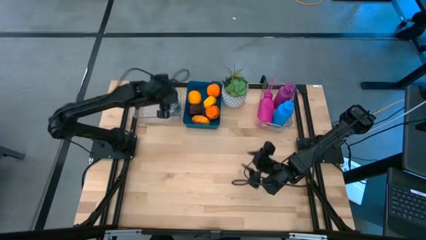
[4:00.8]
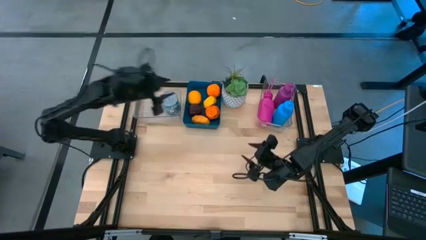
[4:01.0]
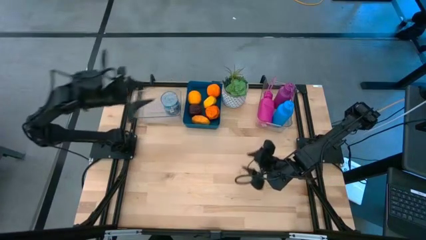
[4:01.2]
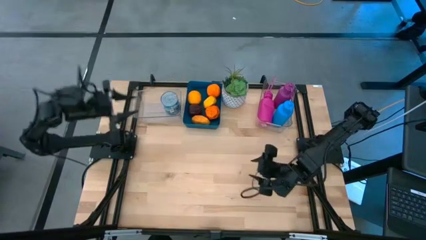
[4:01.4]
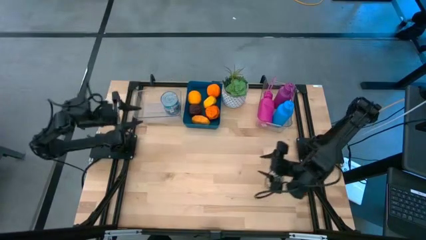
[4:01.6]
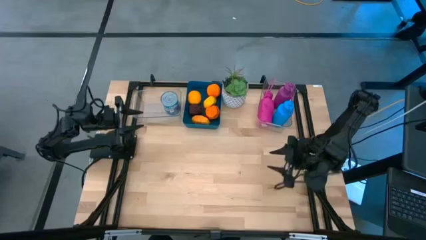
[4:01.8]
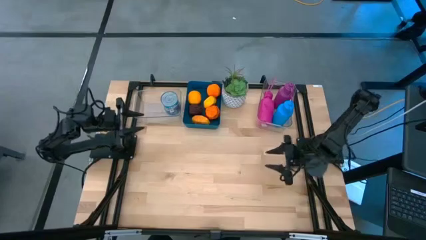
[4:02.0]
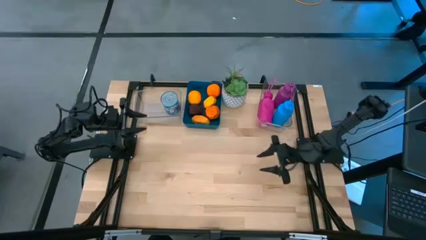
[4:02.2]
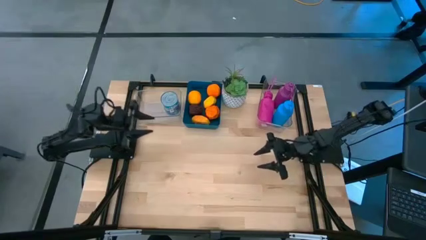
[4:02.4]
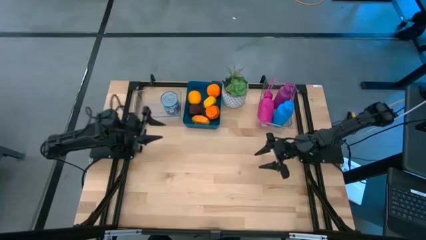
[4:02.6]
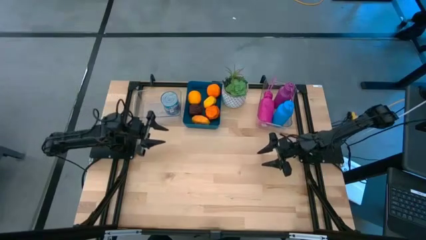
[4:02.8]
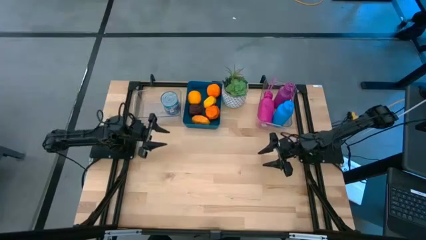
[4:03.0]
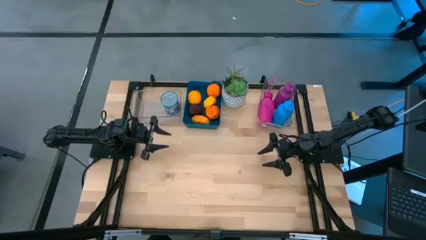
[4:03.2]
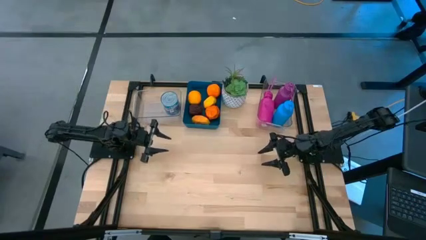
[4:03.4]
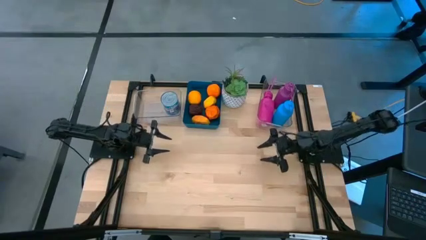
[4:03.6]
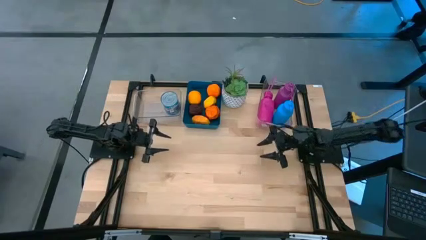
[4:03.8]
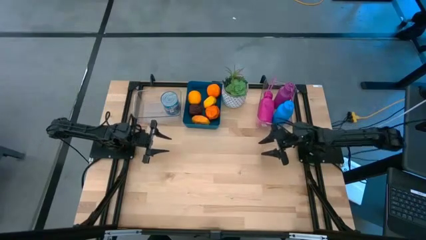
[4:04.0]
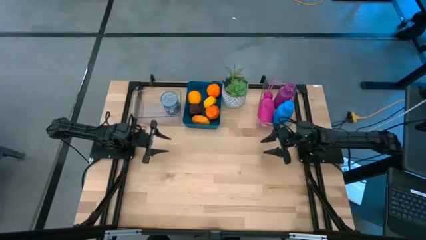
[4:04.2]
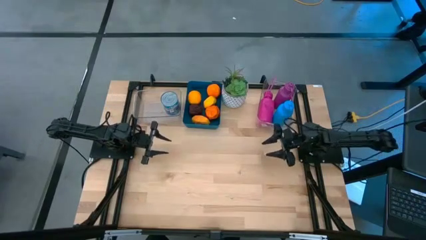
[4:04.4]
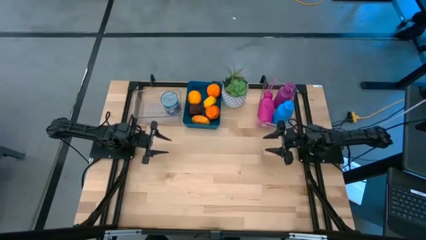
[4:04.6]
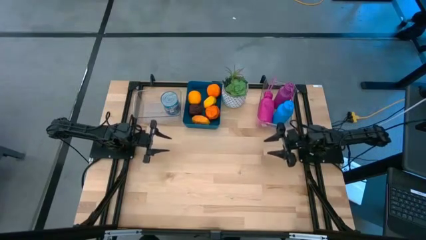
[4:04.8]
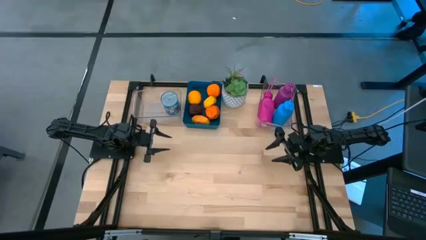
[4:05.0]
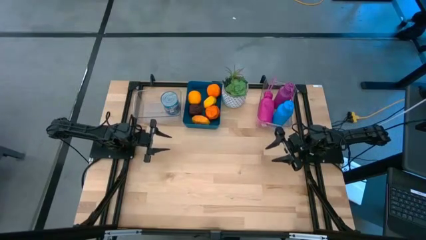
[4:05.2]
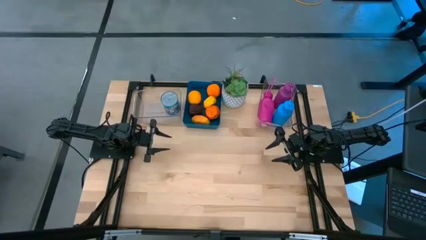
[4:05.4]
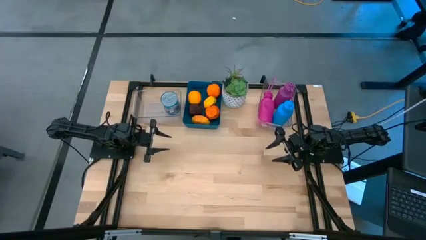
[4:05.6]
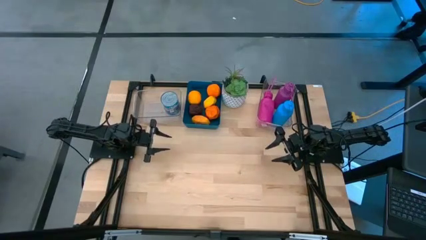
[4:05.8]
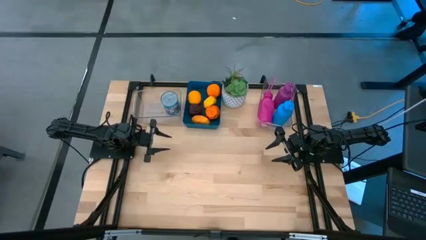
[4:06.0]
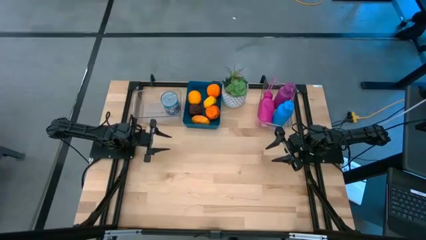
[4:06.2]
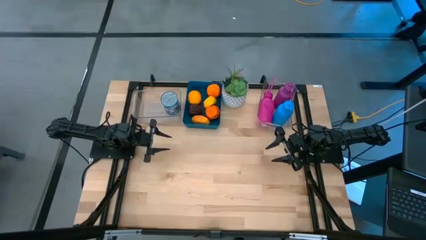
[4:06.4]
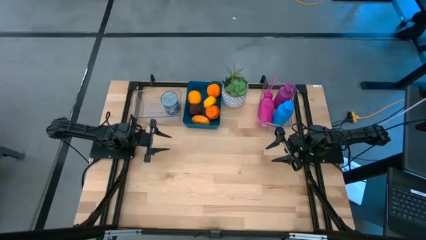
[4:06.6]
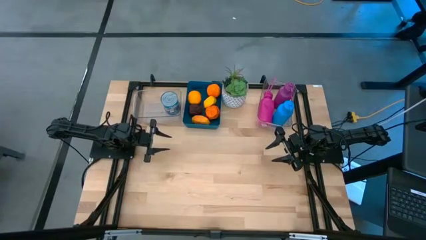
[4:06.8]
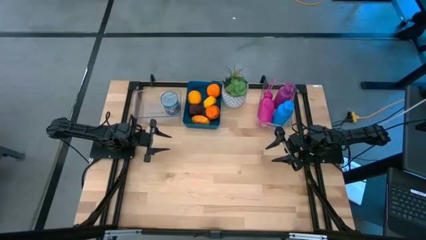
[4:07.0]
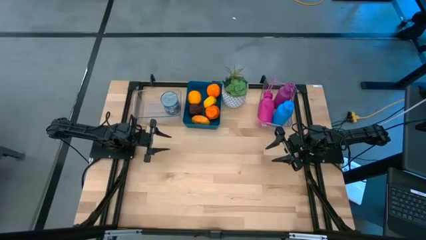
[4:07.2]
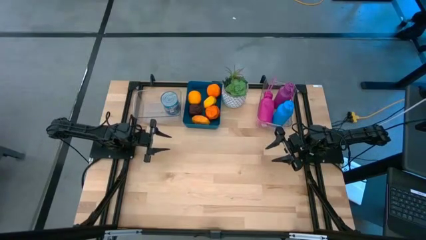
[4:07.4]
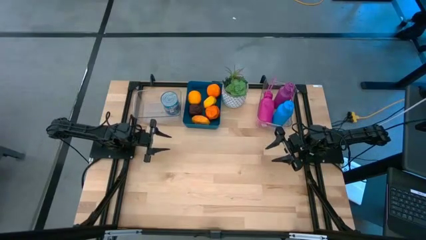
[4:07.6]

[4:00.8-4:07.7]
Task: Pick & Place Food Item
Return to Home Position

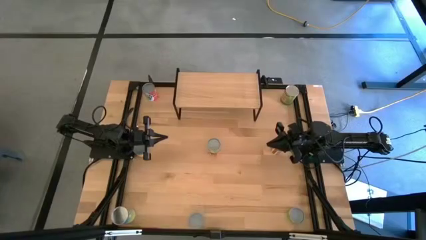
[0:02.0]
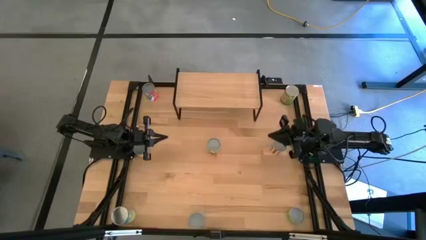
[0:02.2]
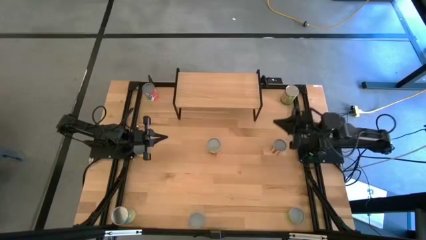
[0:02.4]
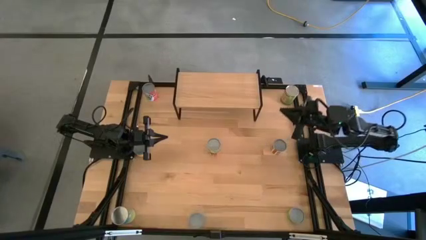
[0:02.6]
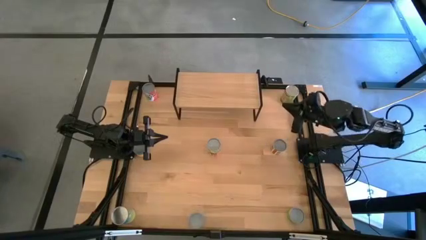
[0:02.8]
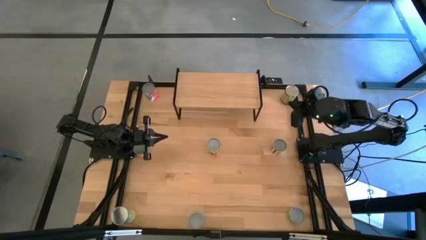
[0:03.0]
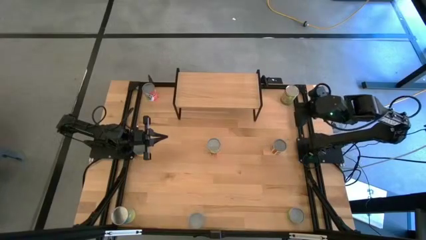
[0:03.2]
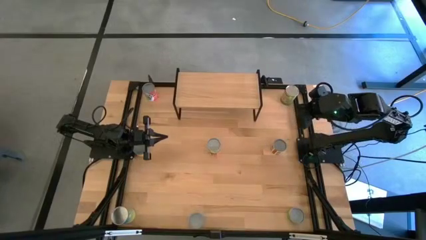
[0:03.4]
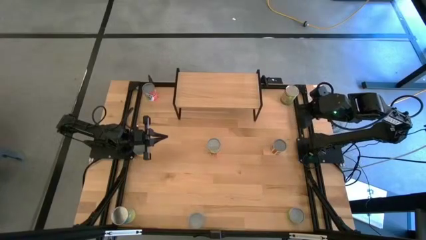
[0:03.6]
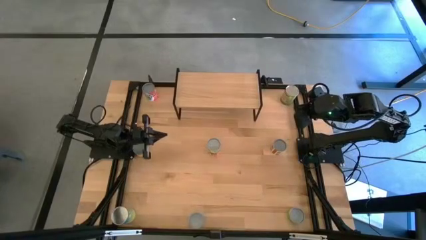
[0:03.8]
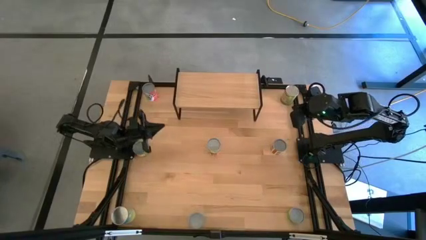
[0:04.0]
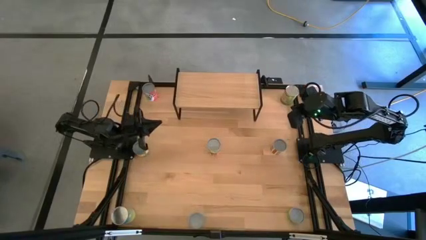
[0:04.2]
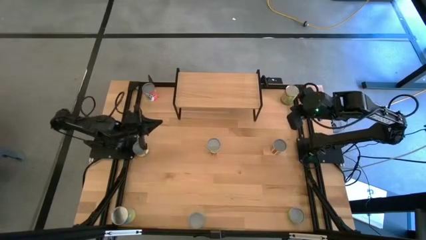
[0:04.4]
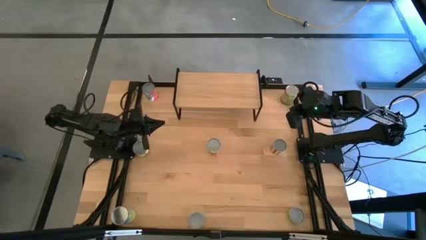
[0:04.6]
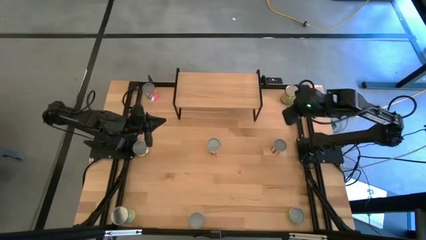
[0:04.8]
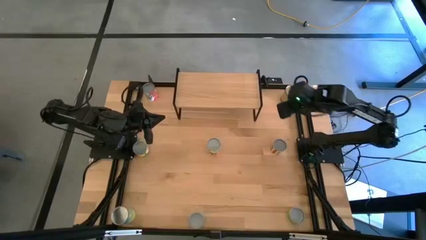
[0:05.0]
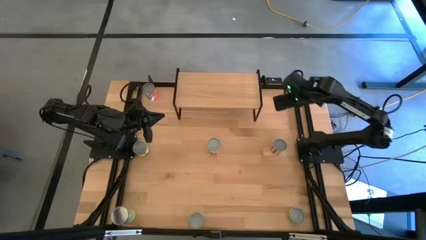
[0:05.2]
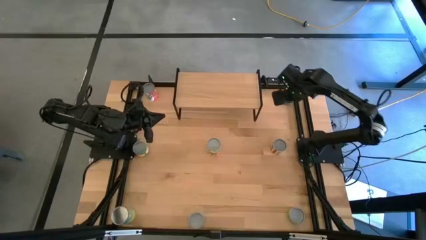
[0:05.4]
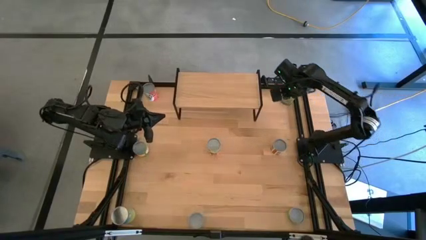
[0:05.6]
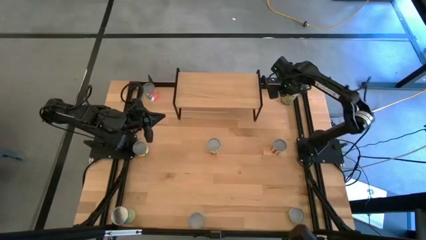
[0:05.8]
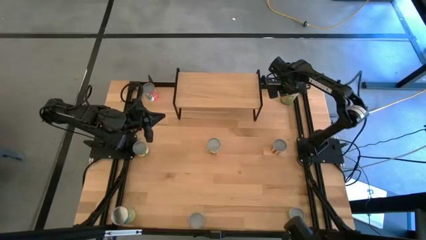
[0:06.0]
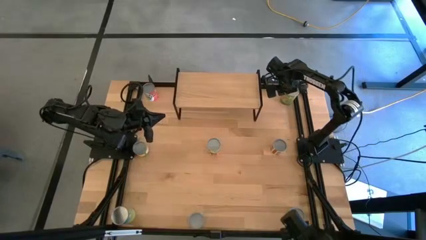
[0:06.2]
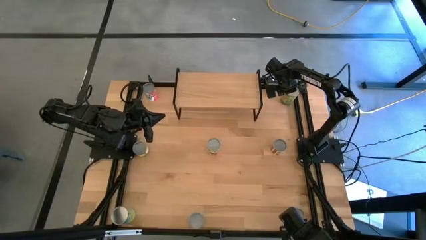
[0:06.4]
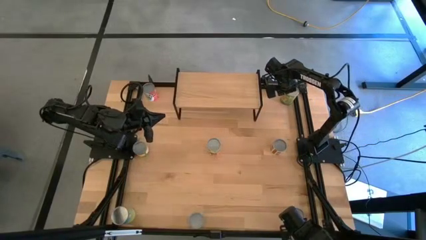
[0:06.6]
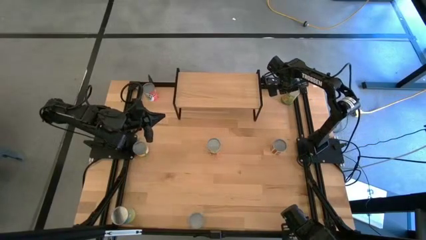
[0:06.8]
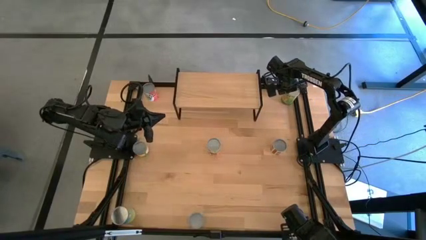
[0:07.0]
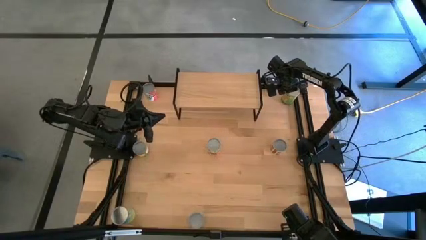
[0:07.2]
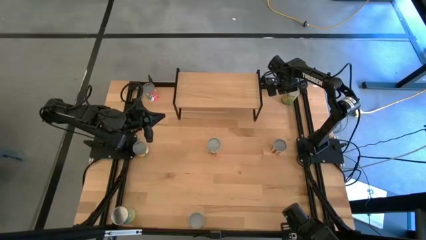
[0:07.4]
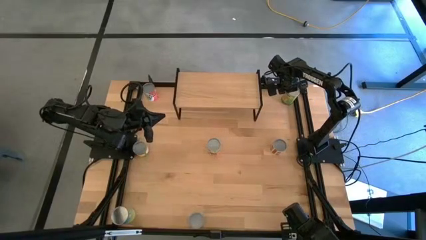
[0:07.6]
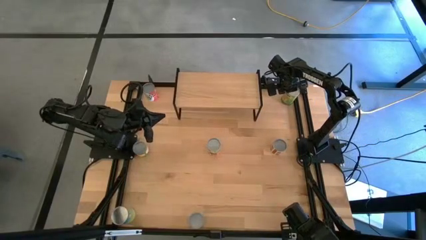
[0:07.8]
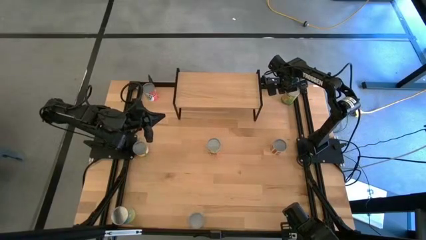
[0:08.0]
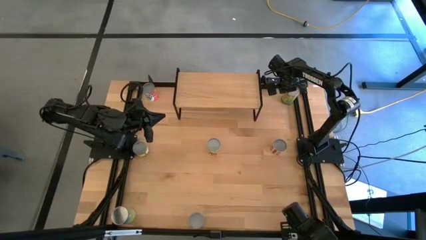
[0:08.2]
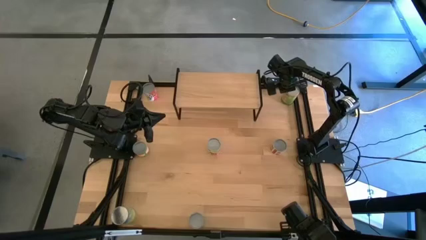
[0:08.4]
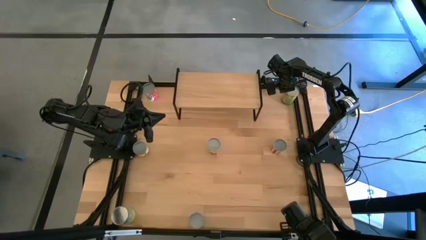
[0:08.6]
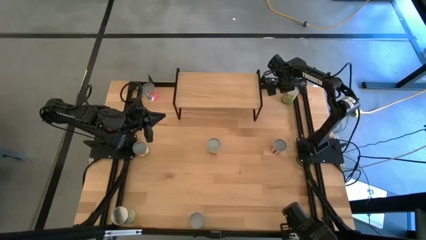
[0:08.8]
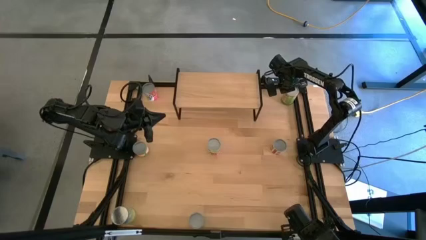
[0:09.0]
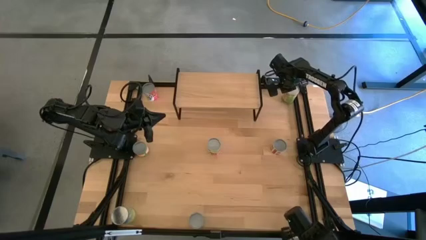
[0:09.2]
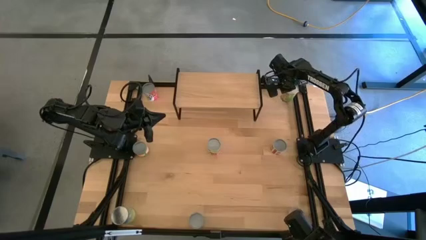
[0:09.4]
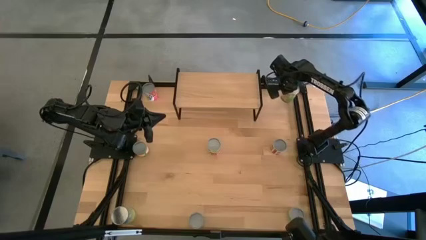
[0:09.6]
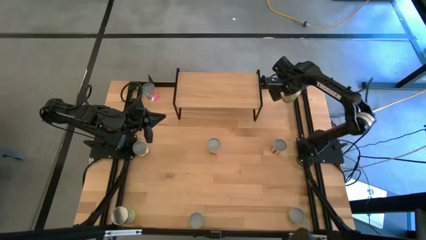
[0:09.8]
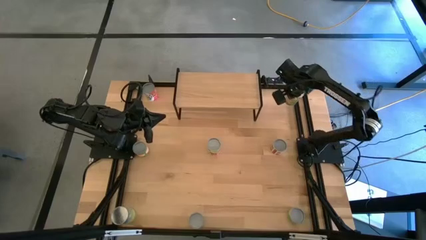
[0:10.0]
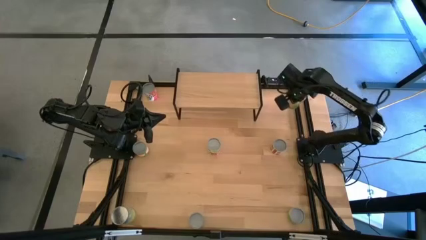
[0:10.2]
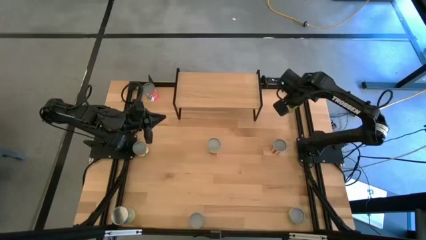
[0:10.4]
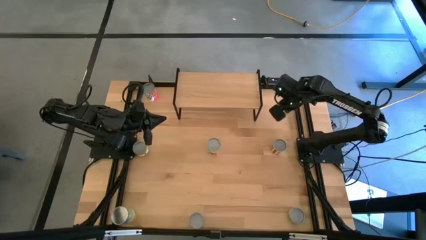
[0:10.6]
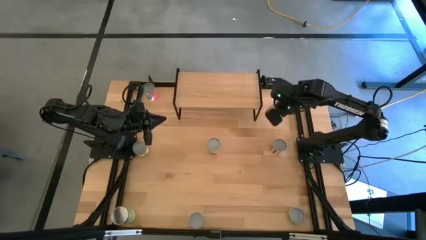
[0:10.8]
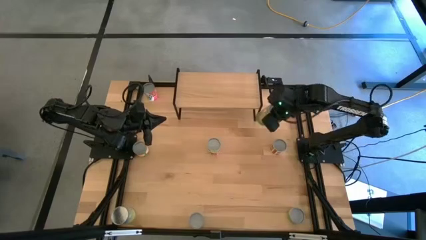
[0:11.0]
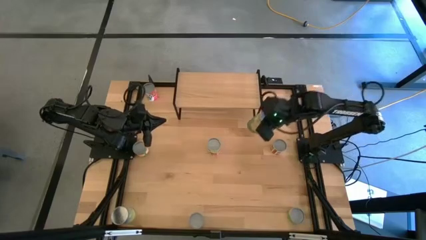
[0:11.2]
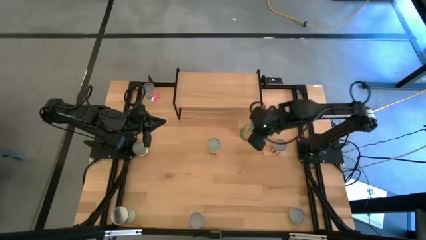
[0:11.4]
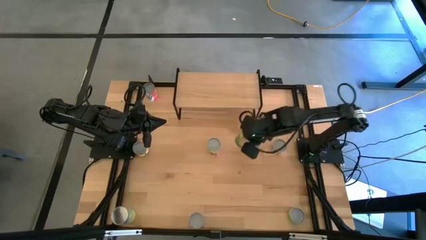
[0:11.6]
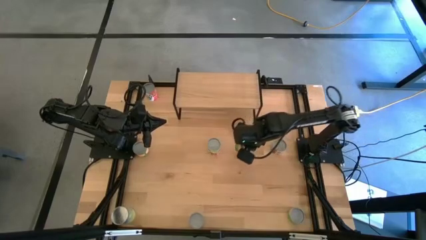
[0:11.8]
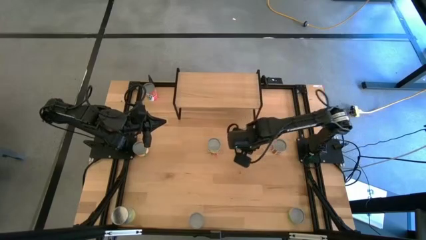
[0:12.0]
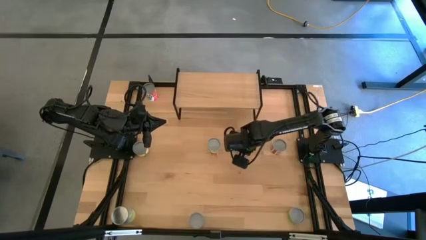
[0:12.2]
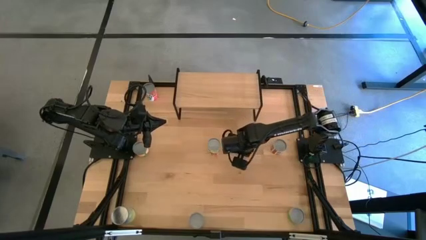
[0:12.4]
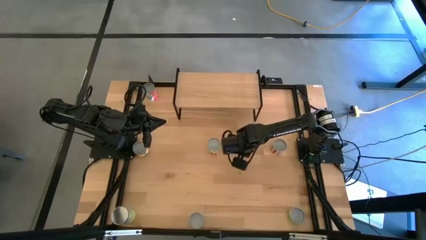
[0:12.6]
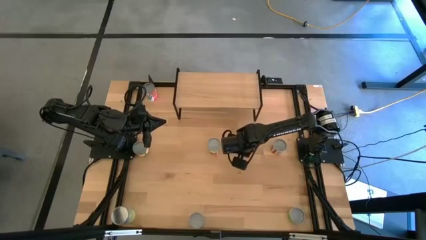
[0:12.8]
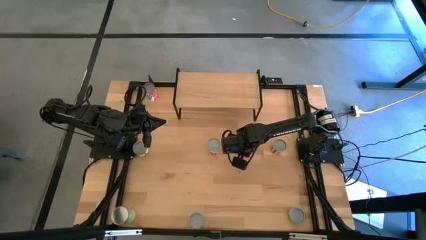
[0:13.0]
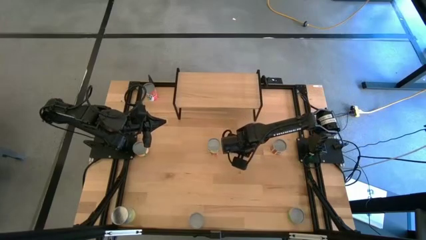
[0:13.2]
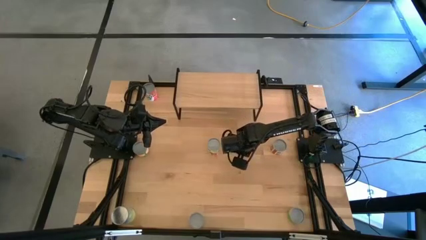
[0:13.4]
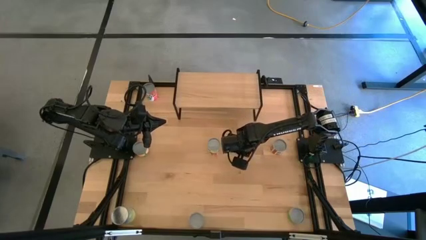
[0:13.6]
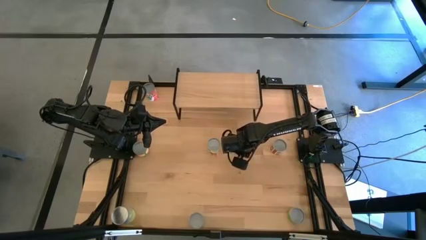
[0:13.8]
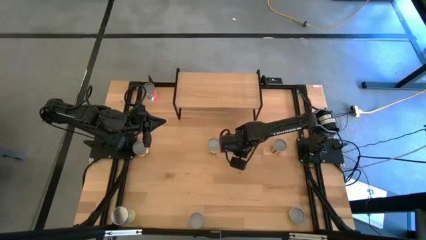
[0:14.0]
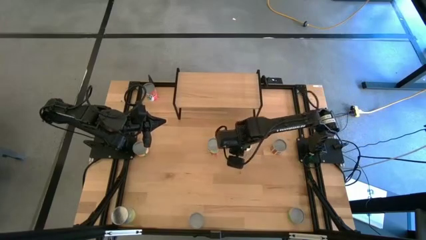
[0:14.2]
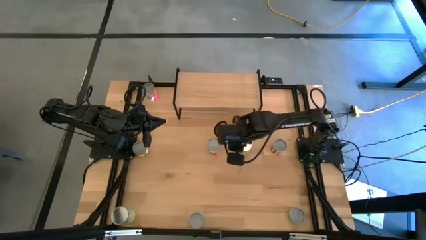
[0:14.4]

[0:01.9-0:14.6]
Task: Pick and place cans onto a shelf
Put the canned oranges on the shelf
